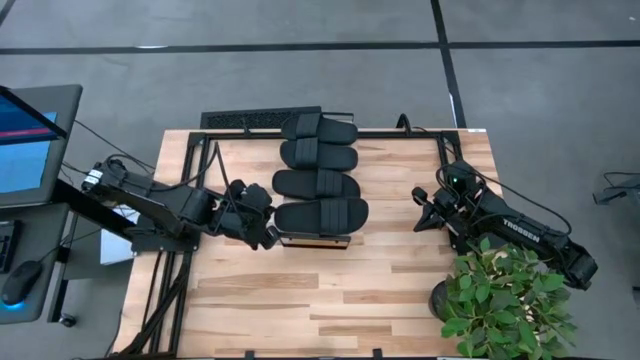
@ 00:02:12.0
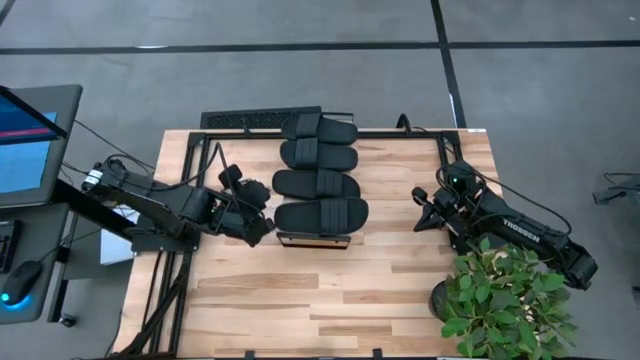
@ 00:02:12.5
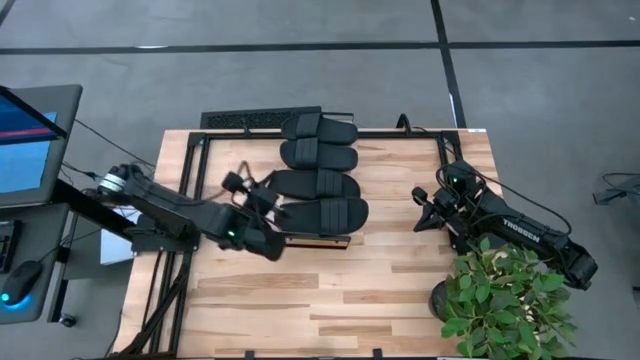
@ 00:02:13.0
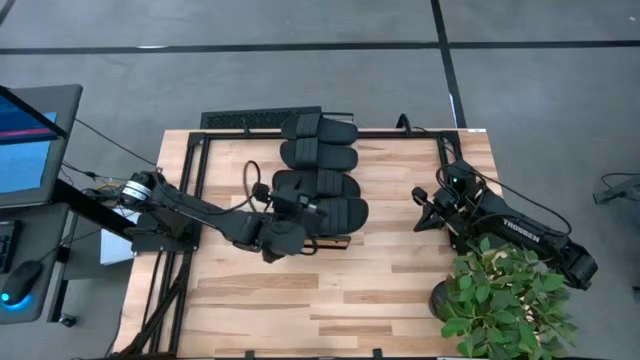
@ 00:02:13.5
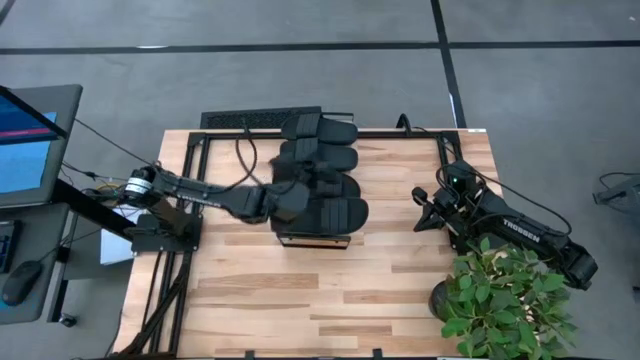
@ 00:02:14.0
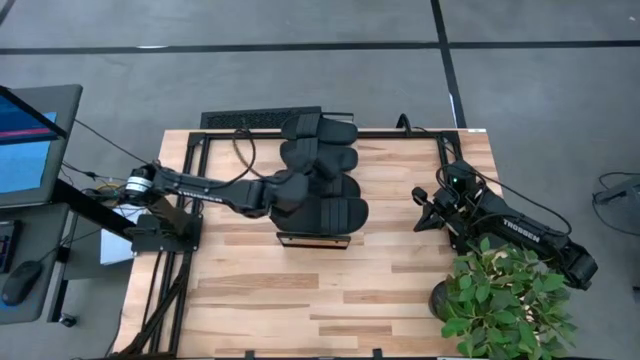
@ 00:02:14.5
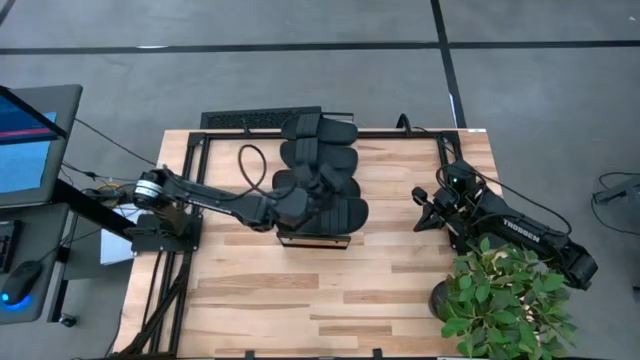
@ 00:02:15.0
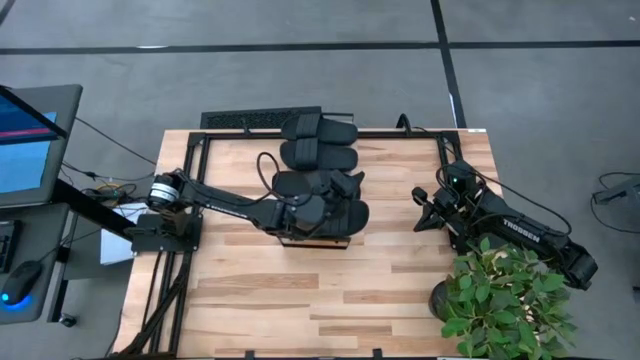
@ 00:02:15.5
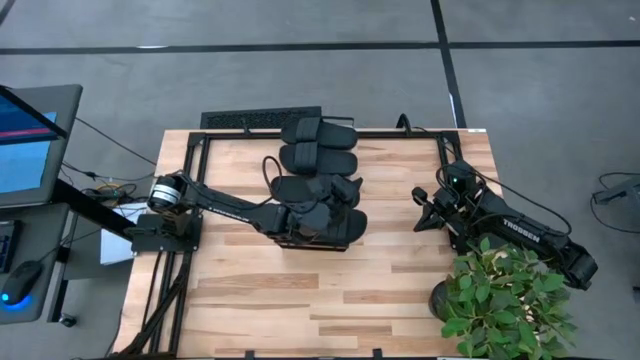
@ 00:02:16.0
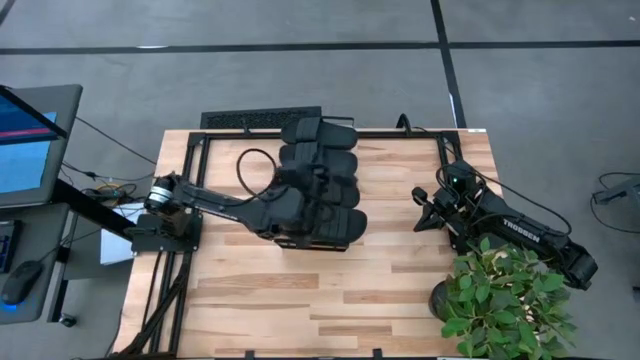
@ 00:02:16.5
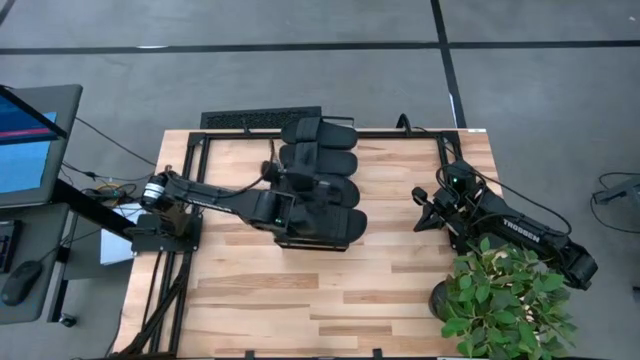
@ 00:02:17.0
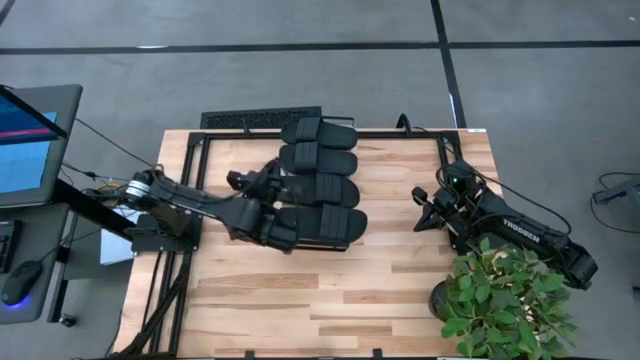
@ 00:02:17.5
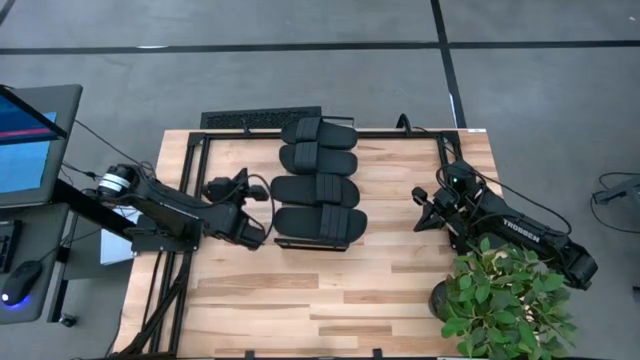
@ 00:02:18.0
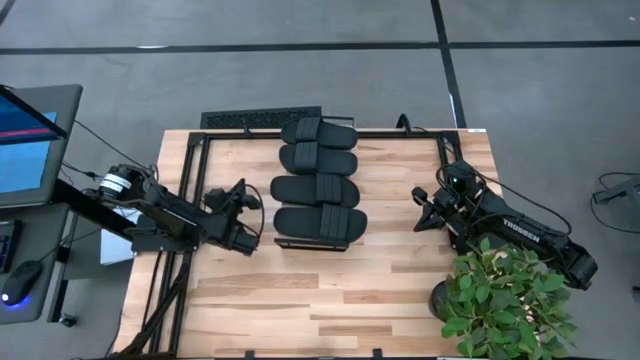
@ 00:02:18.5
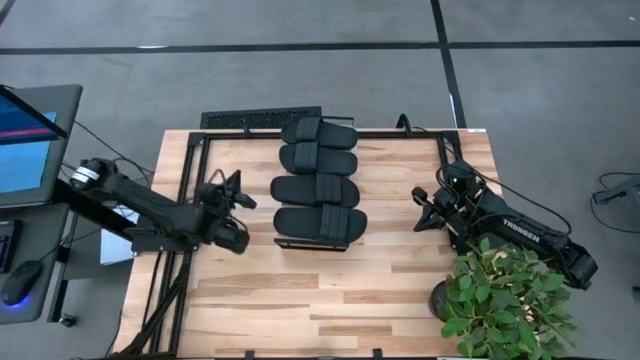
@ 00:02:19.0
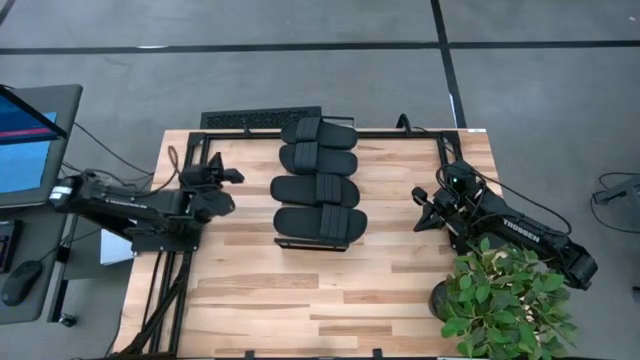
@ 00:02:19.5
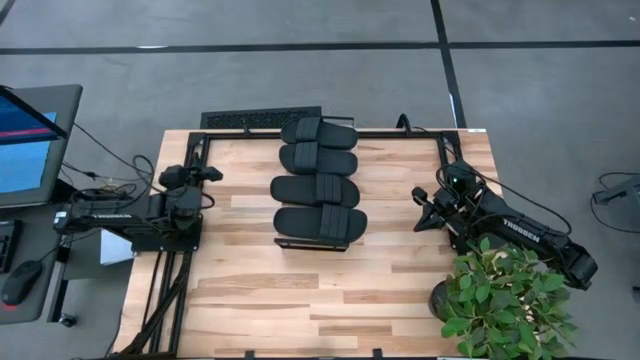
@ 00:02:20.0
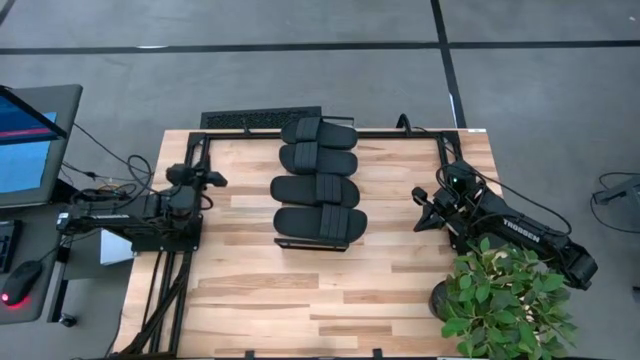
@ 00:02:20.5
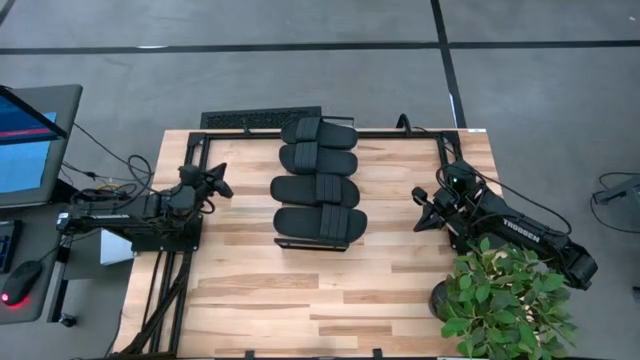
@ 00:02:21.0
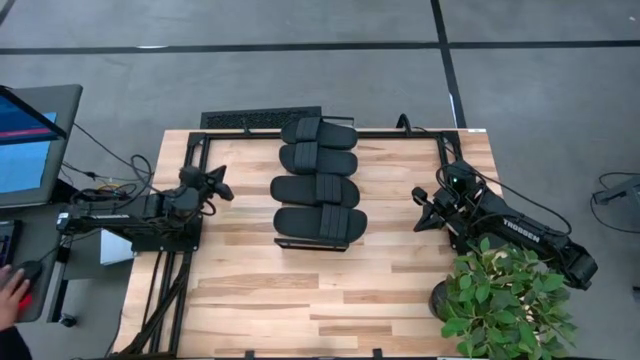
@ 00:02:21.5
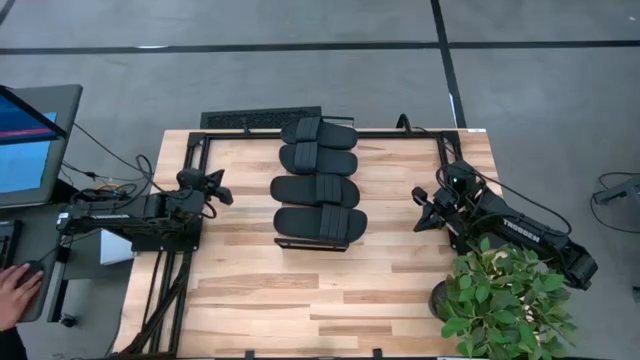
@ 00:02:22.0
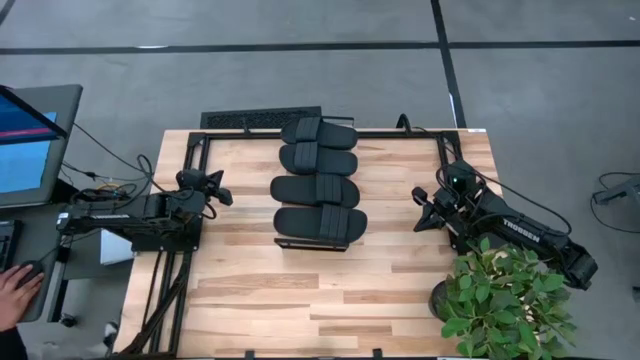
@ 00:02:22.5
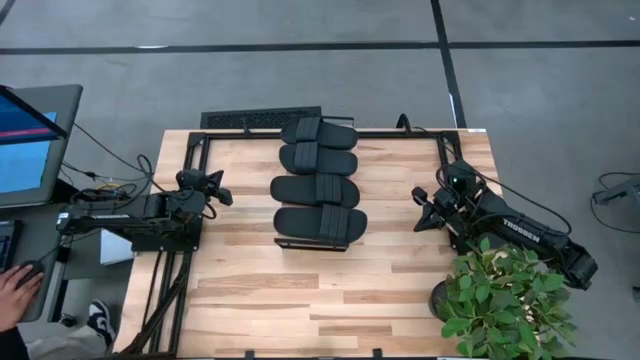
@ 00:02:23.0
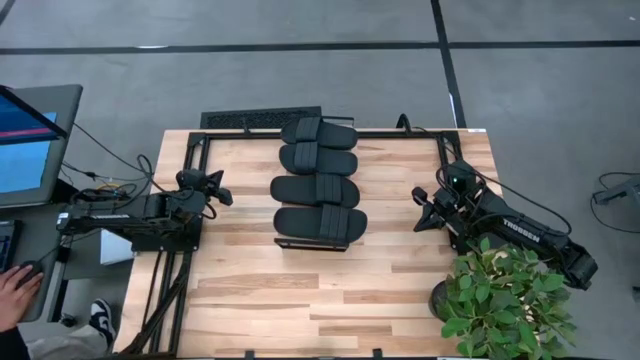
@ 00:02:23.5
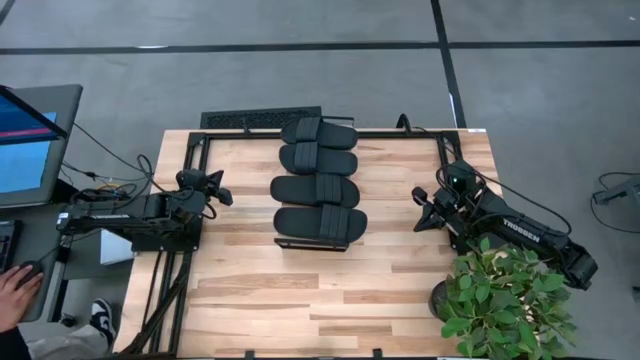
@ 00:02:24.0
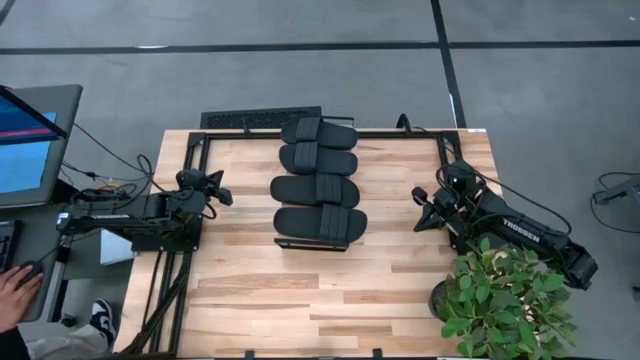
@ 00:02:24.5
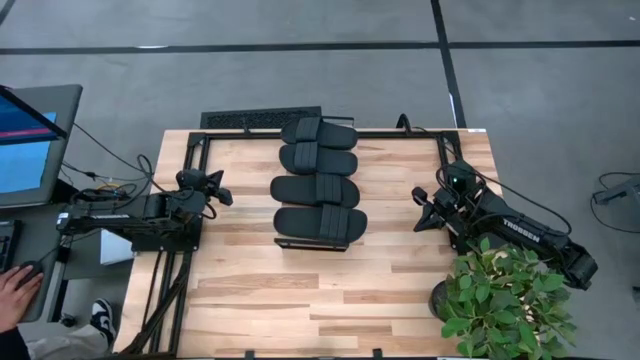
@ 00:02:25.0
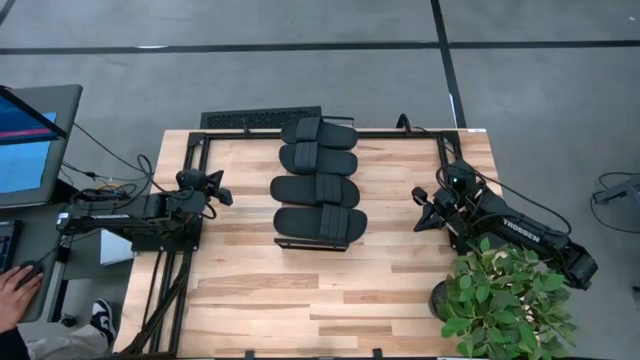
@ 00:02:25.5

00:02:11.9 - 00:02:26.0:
Task: Pick and place slides into the shelf
Return to Home Position
